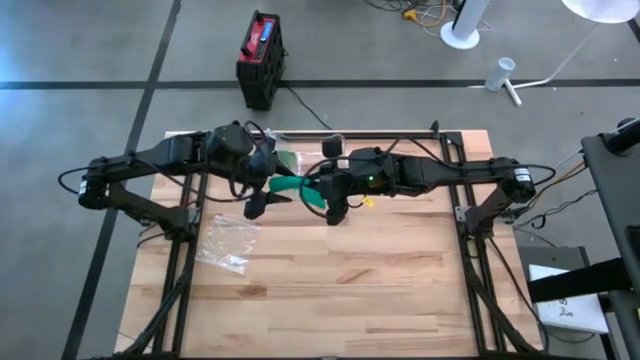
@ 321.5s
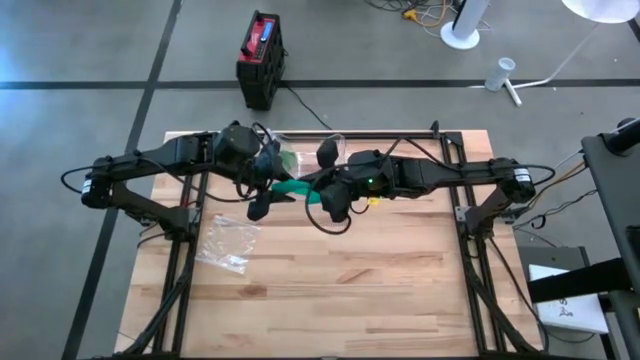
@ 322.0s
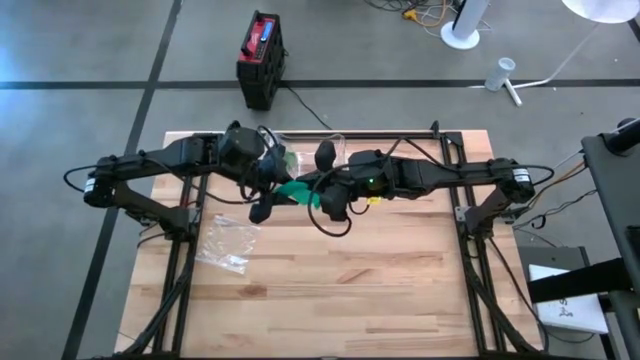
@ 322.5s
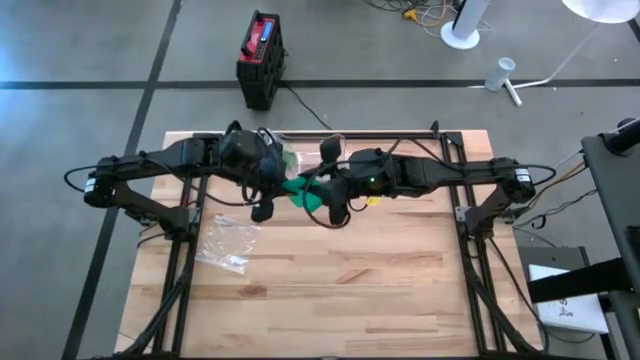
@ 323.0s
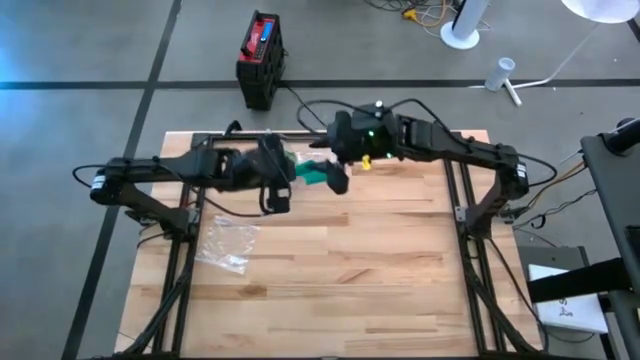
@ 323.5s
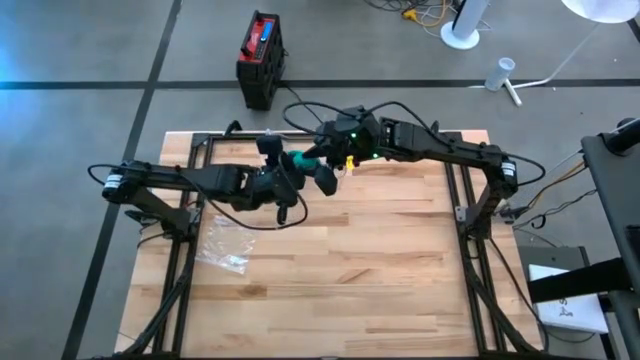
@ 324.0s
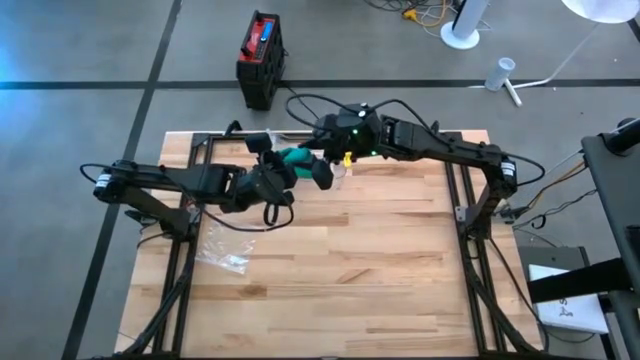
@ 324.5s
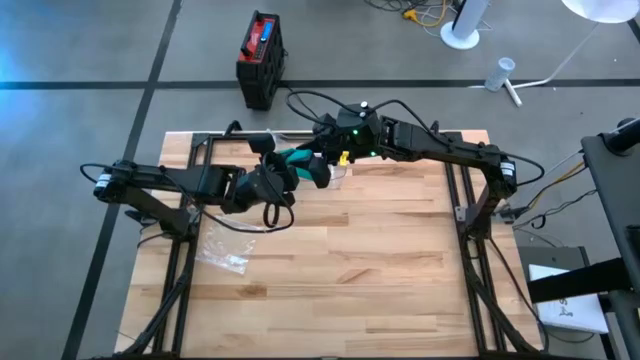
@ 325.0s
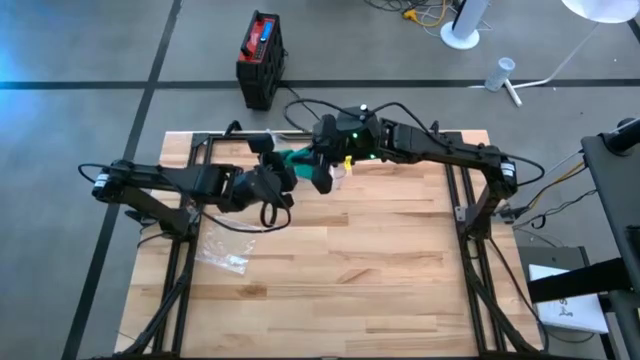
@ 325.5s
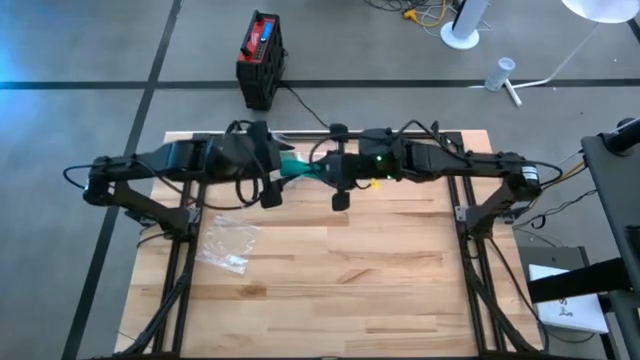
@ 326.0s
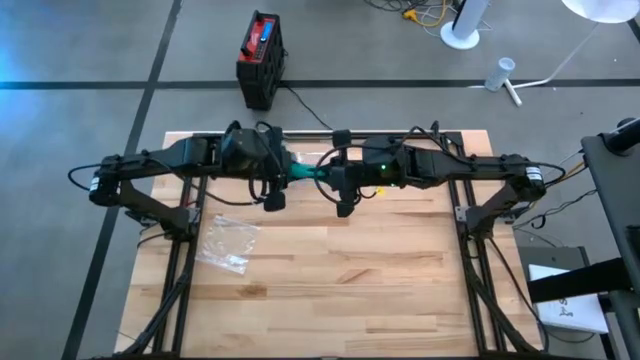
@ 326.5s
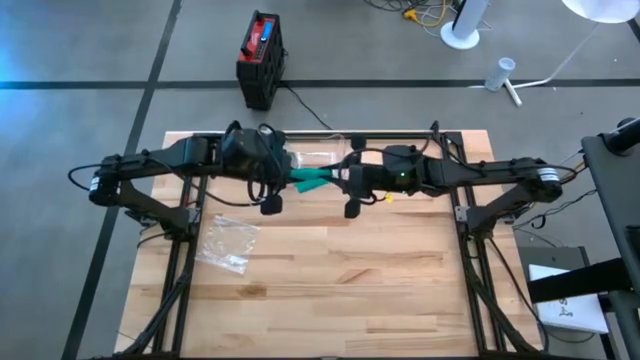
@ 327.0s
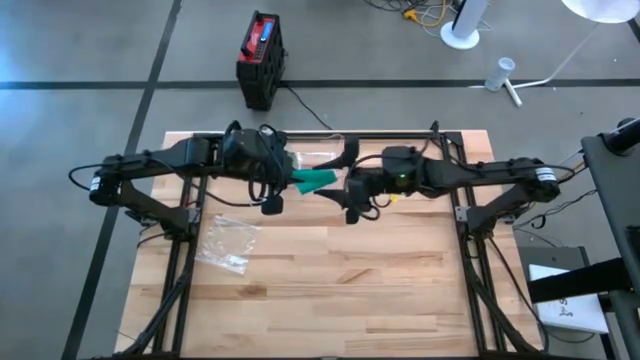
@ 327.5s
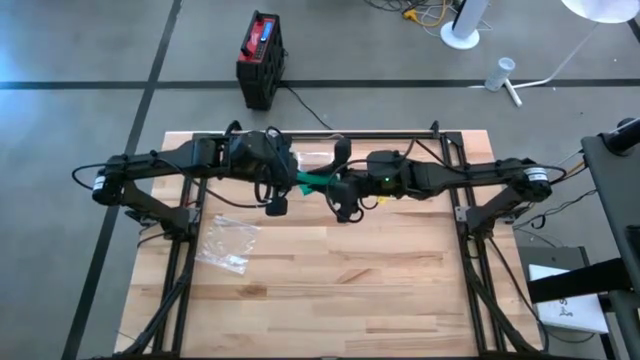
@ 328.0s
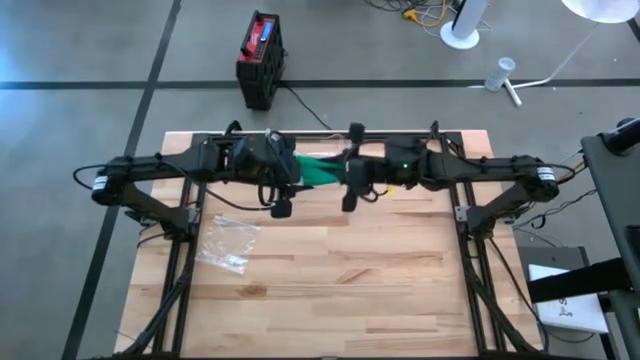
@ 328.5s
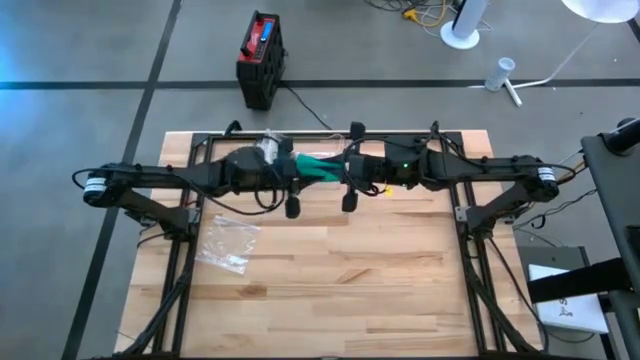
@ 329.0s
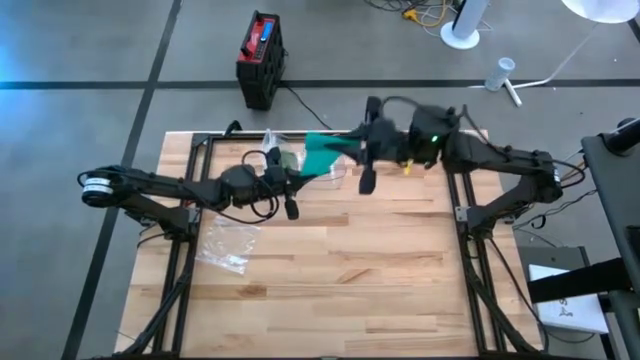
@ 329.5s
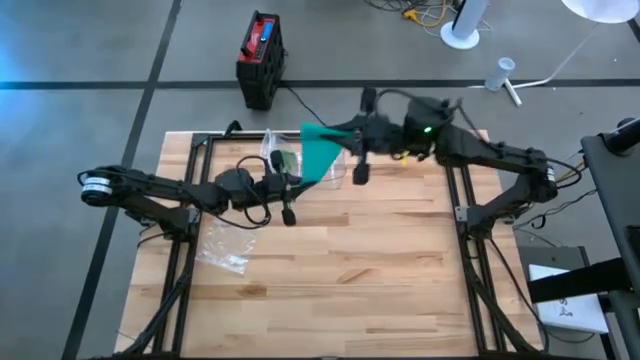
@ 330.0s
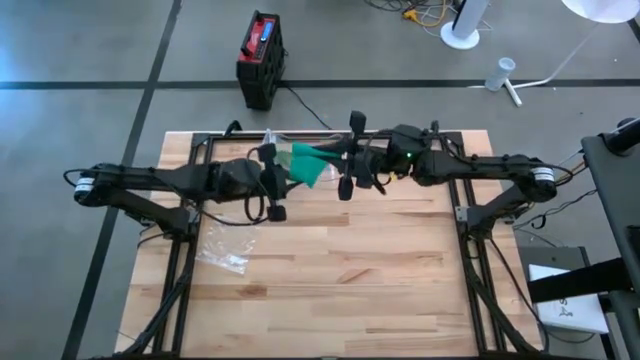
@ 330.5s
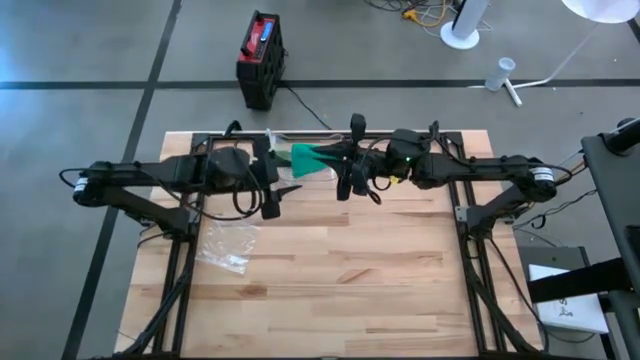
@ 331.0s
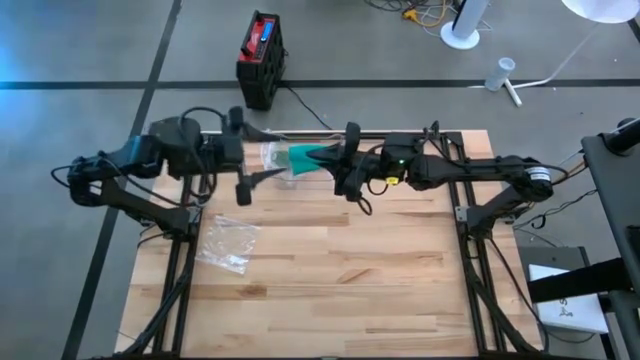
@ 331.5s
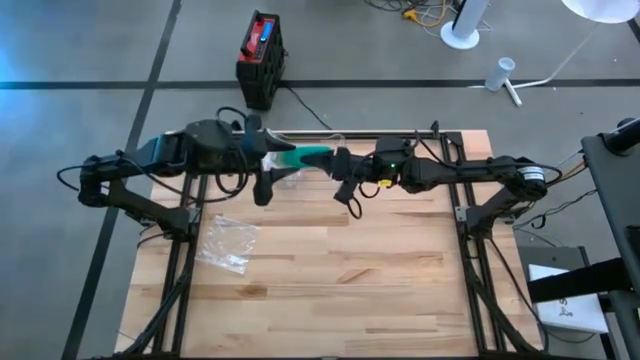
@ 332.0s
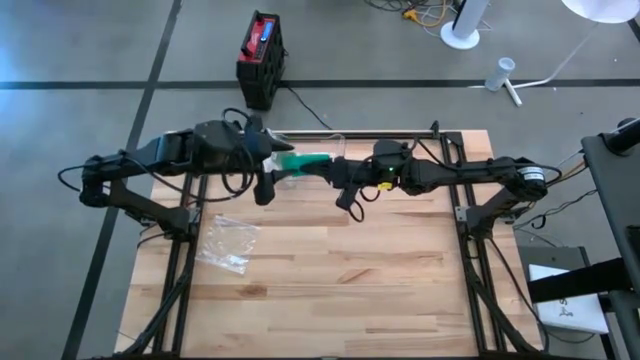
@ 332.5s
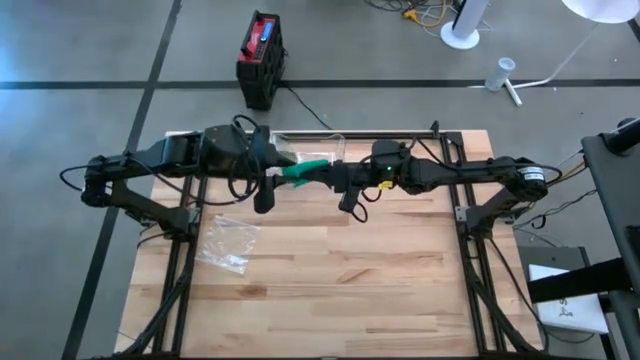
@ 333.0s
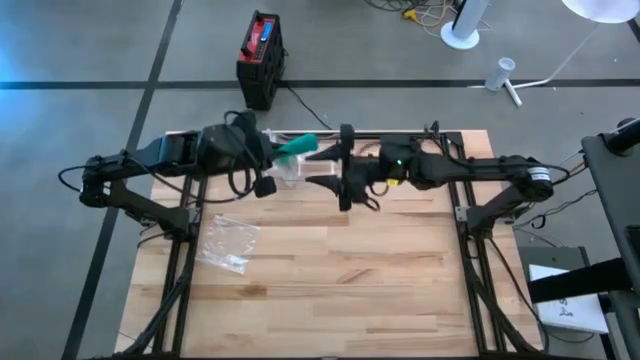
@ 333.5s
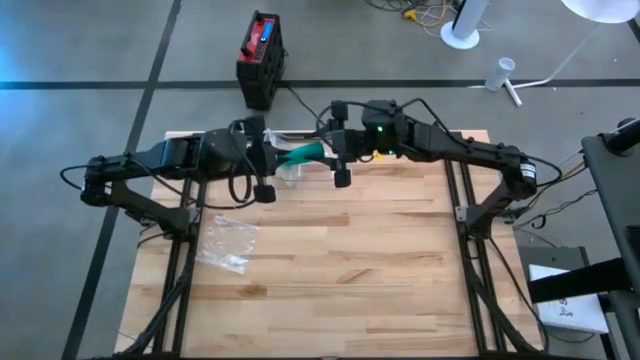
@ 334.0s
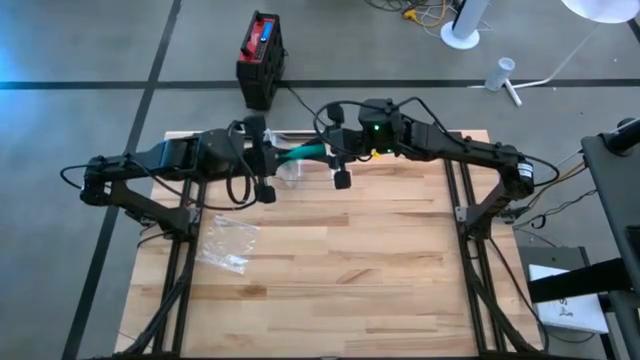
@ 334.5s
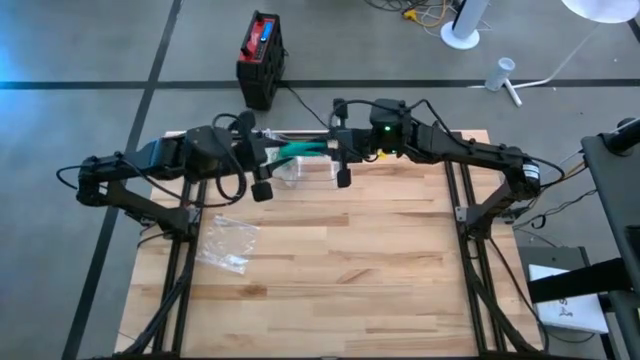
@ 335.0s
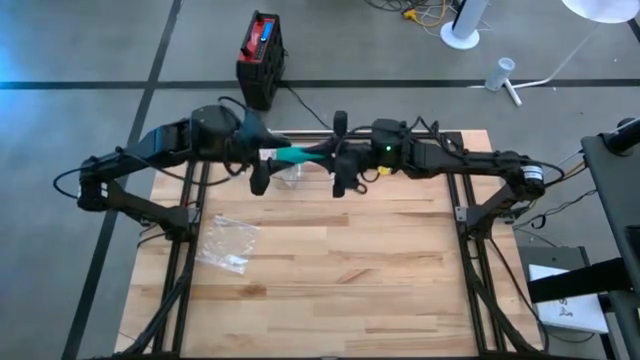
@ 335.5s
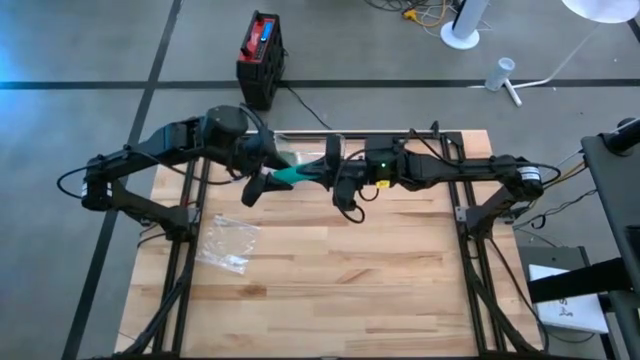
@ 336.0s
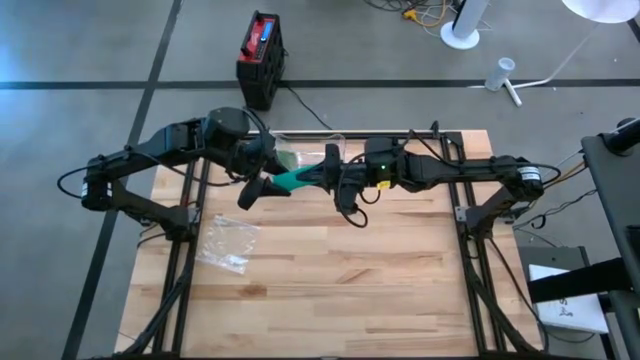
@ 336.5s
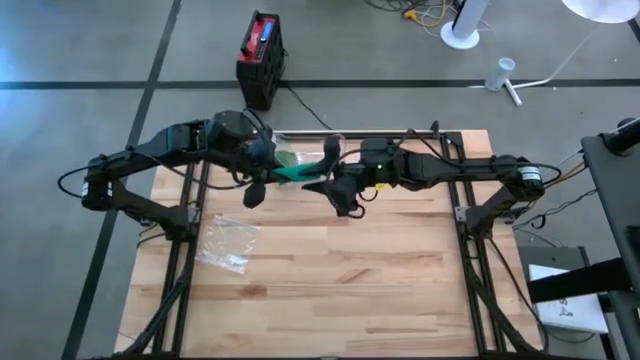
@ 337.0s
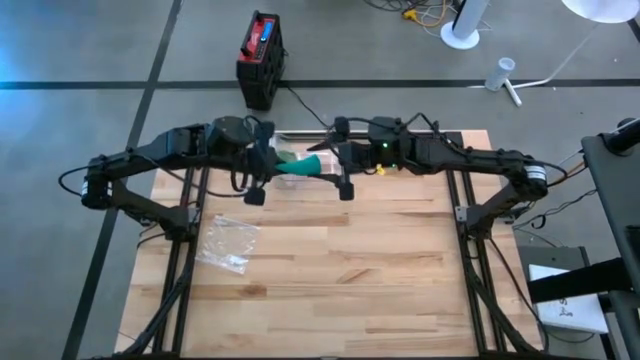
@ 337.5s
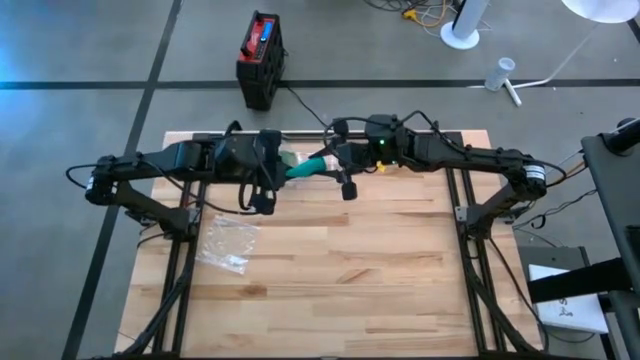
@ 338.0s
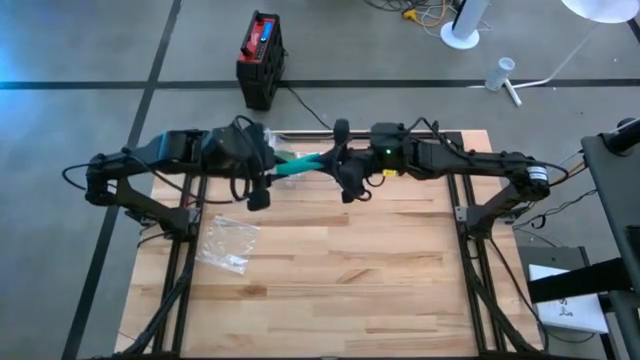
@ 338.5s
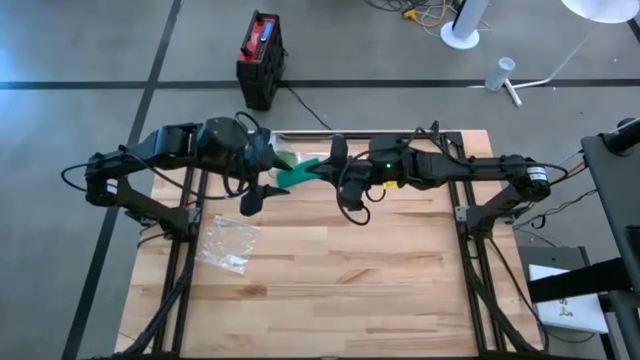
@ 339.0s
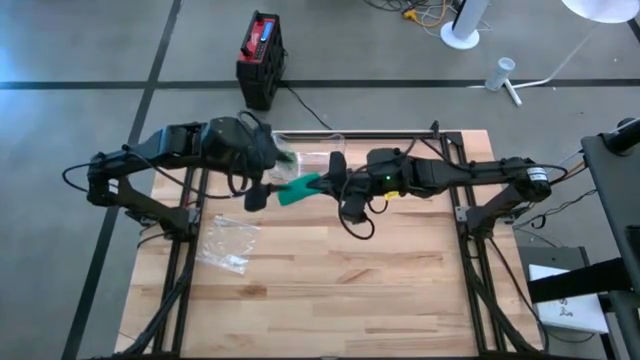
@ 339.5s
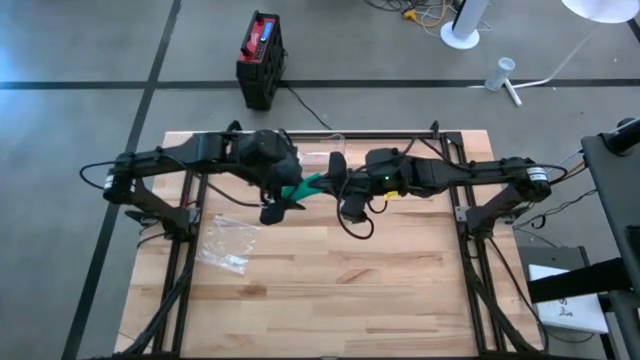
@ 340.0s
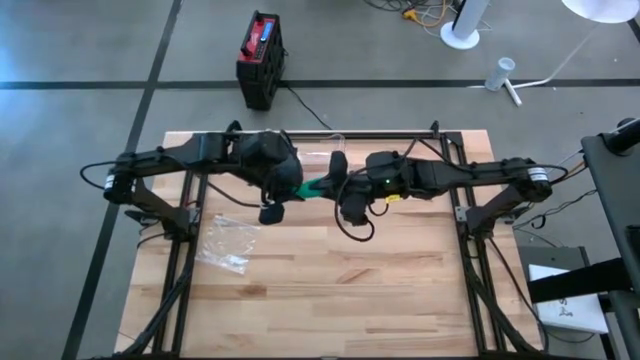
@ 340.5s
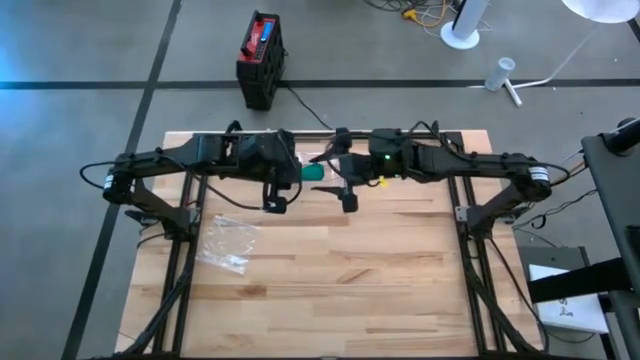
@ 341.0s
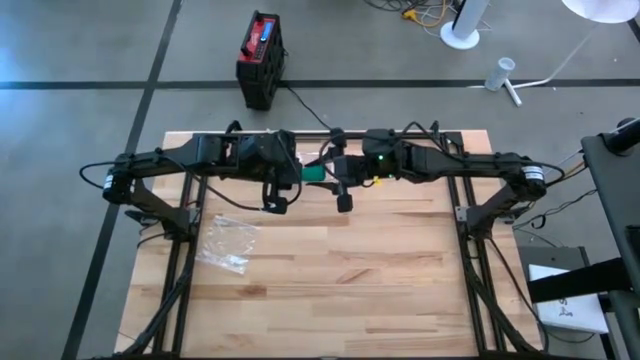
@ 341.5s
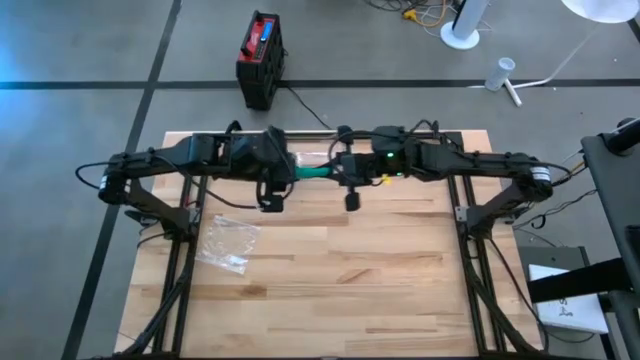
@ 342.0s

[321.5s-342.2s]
Task: Roll bandage
Roll the blue bandage
